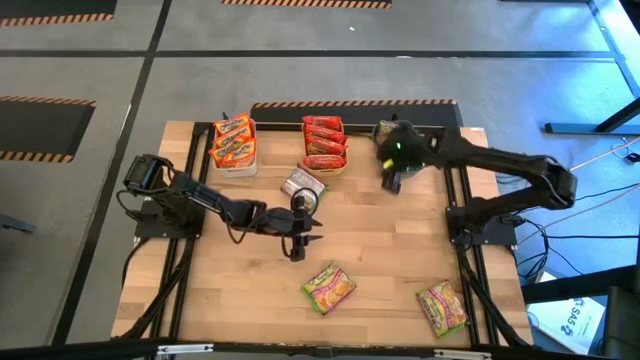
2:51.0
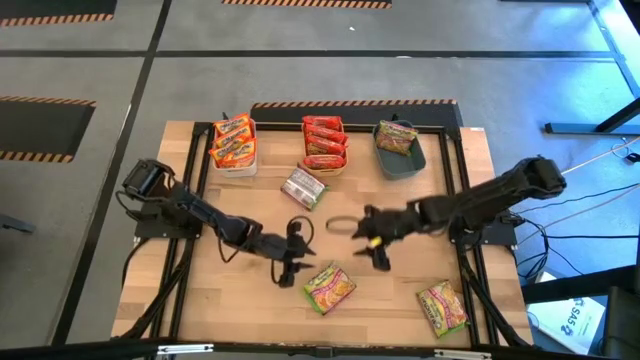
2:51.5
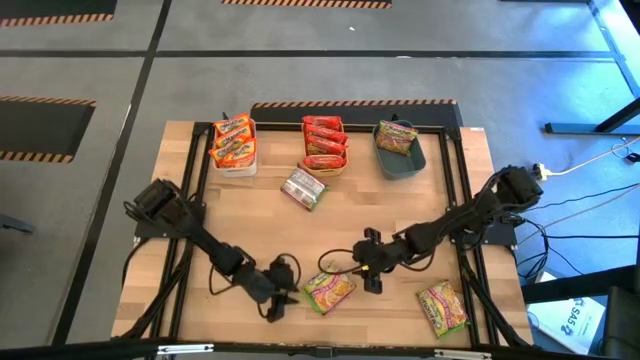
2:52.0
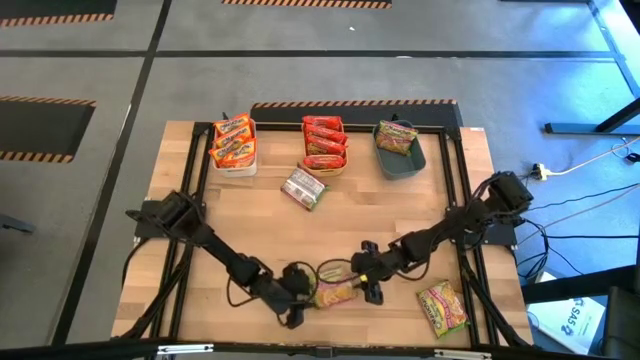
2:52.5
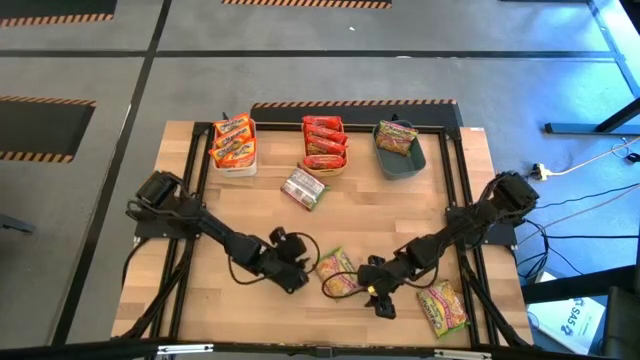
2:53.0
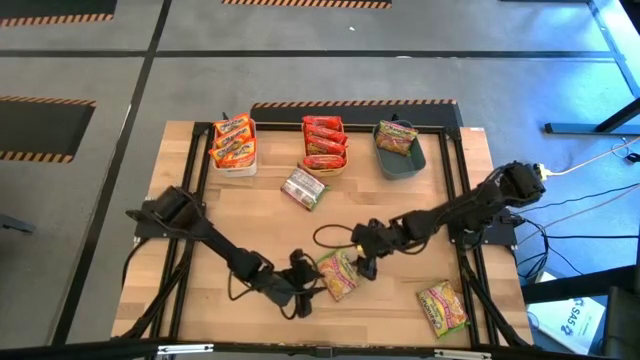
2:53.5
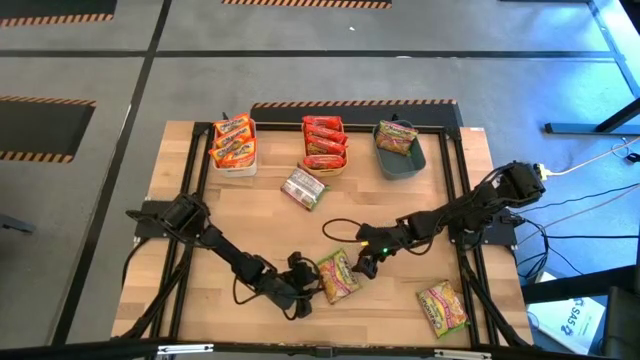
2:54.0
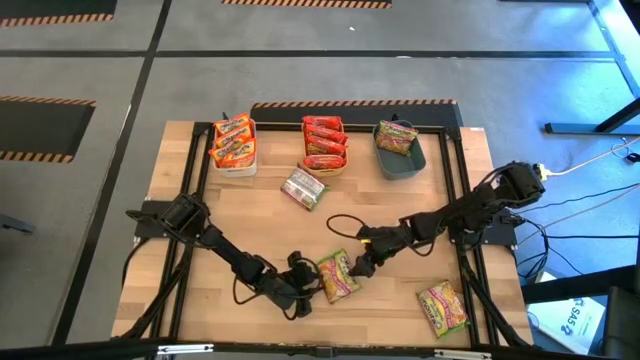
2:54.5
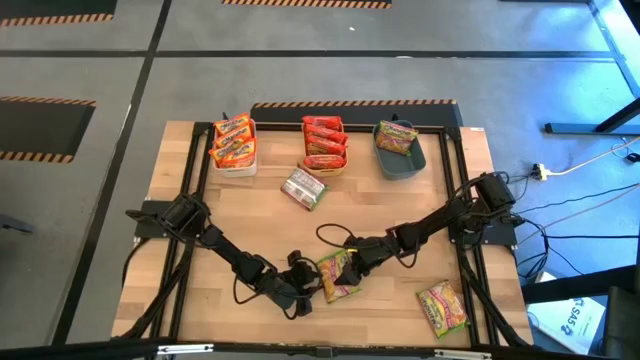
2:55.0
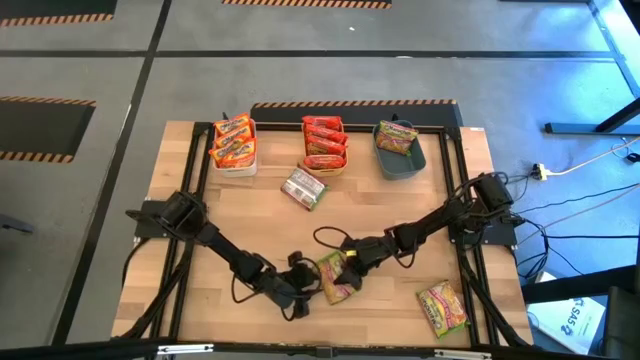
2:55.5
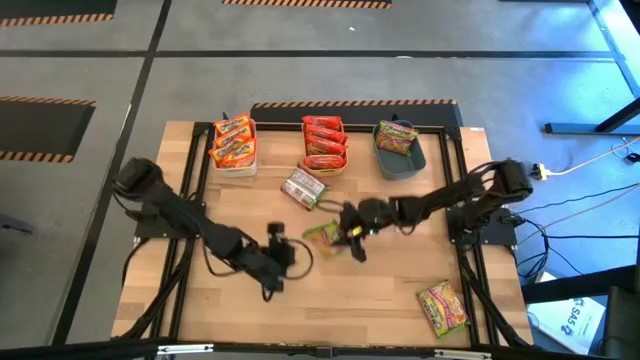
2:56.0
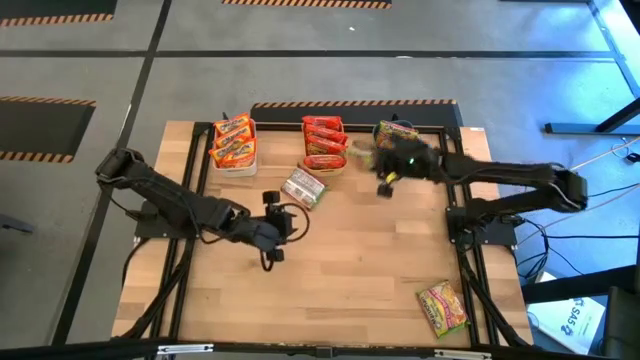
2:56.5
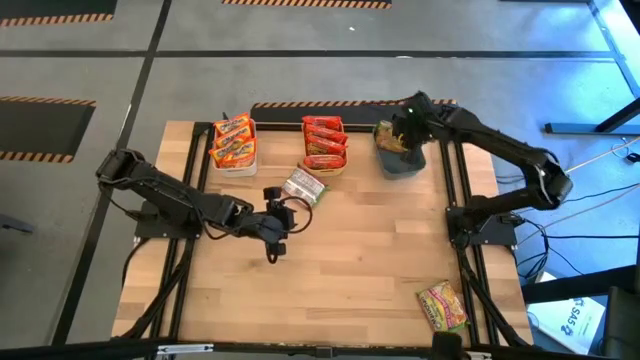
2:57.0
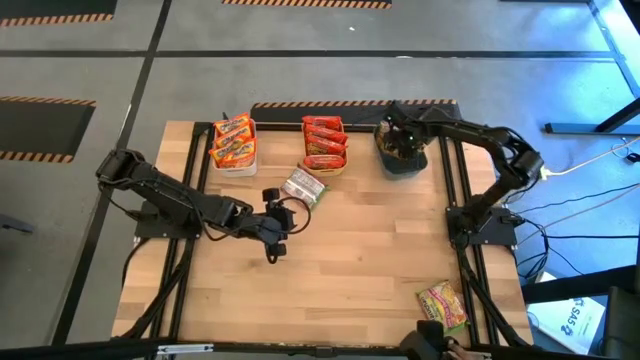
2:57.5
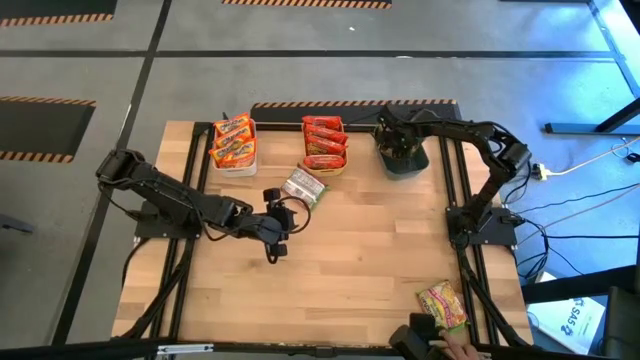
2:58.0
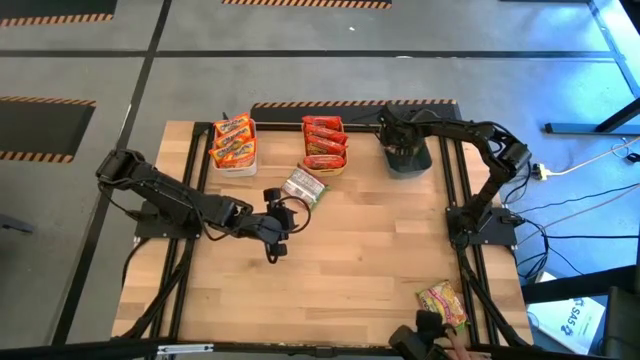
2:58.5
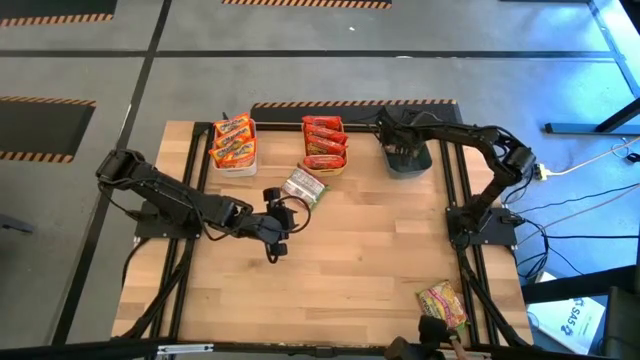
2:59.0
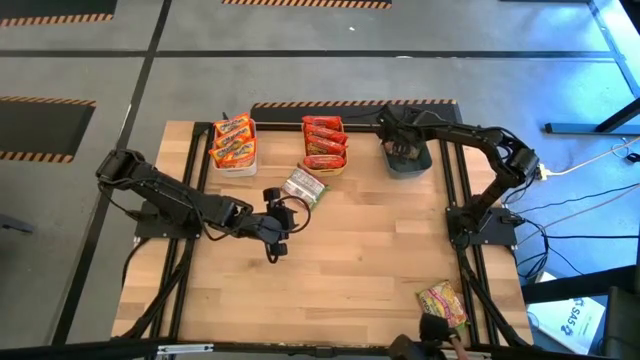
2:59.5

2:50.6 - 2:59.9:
Task: Sort Maruchan noodles
Put the green noodle pack into the blue bin

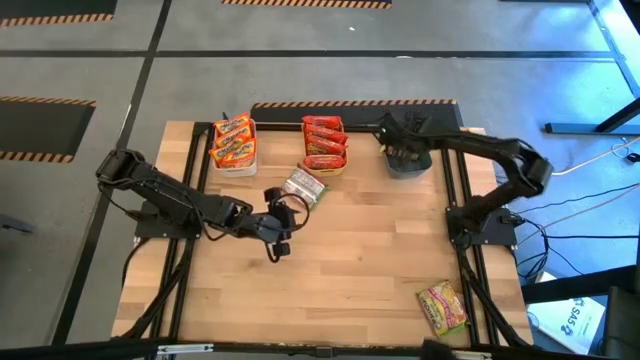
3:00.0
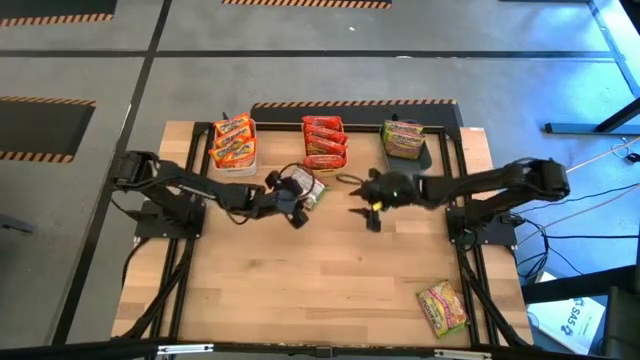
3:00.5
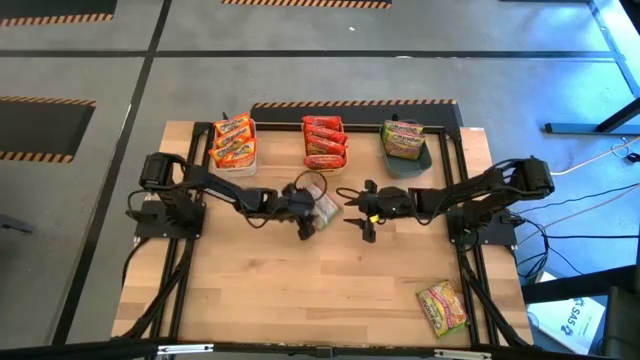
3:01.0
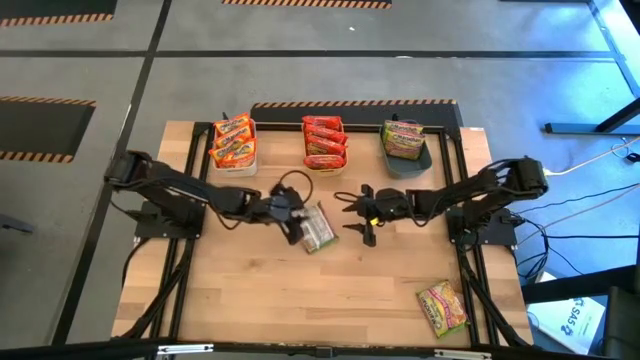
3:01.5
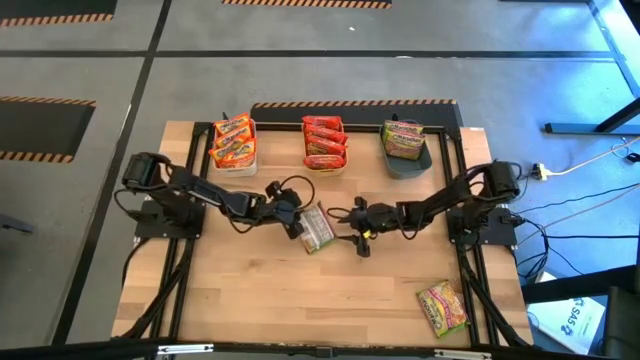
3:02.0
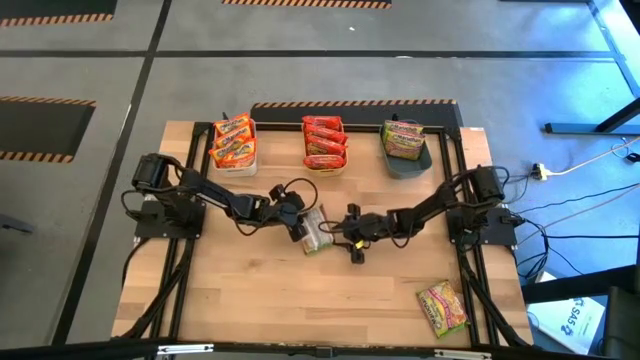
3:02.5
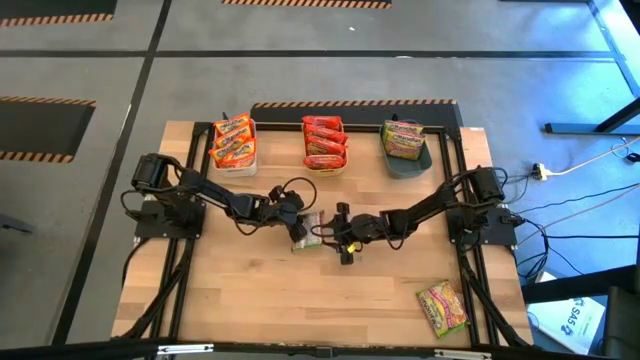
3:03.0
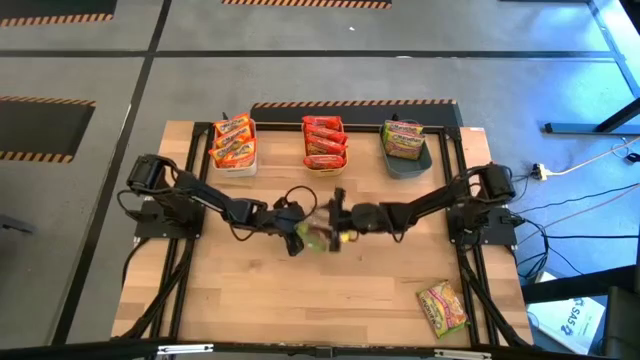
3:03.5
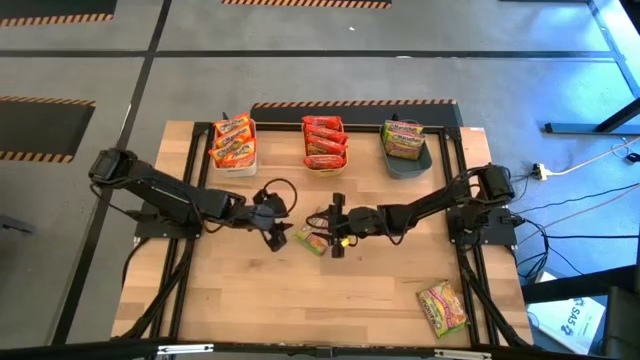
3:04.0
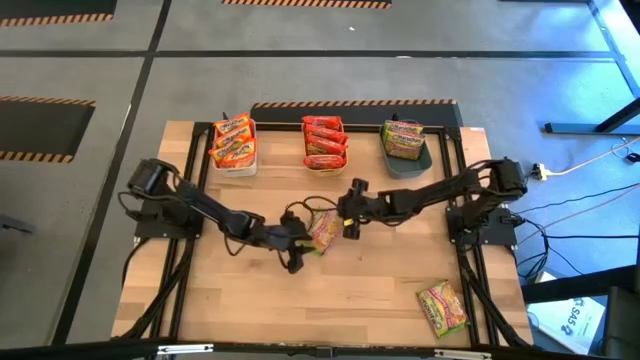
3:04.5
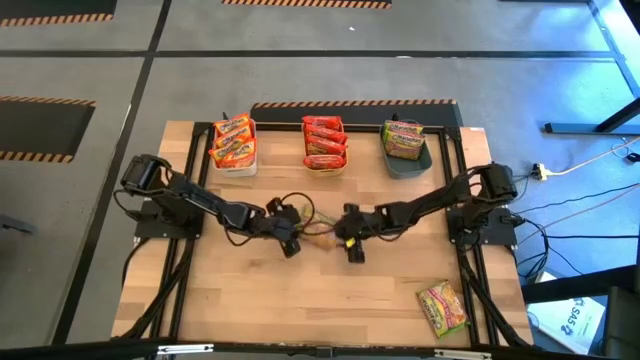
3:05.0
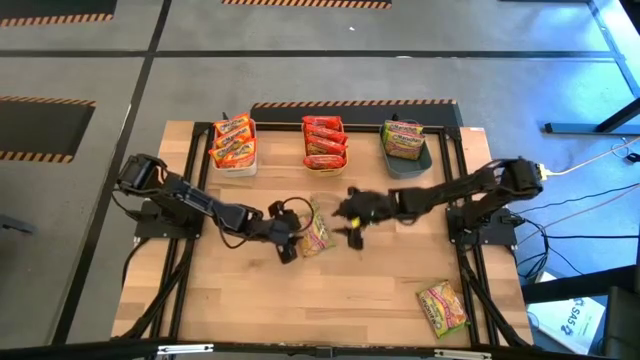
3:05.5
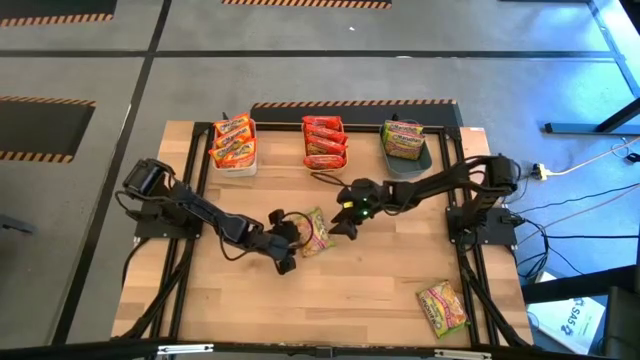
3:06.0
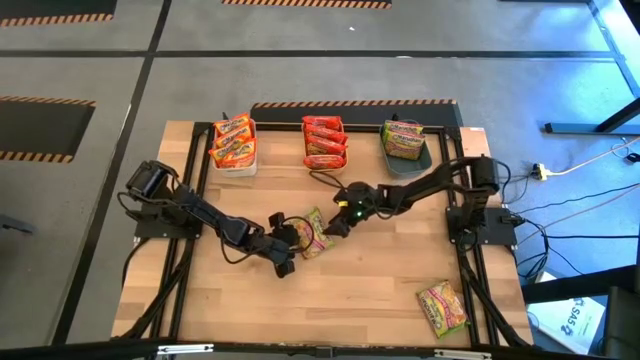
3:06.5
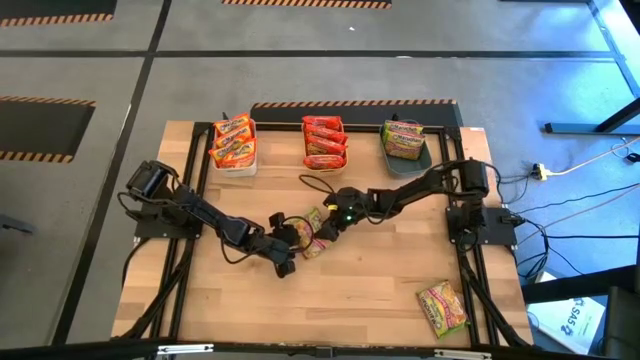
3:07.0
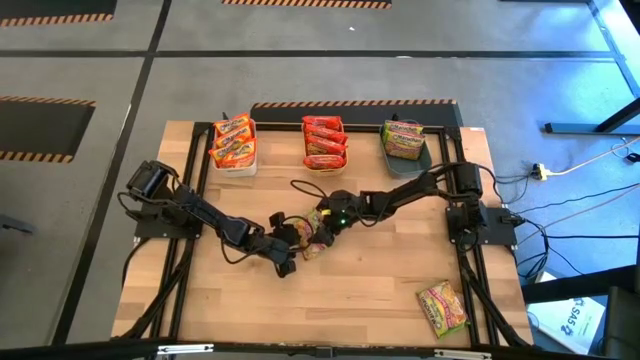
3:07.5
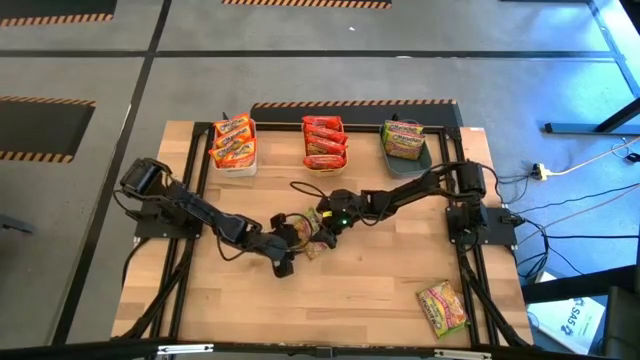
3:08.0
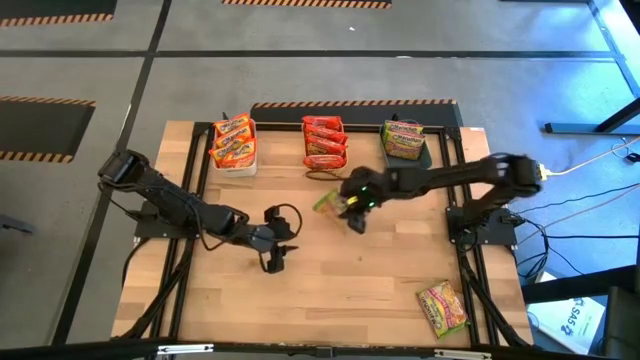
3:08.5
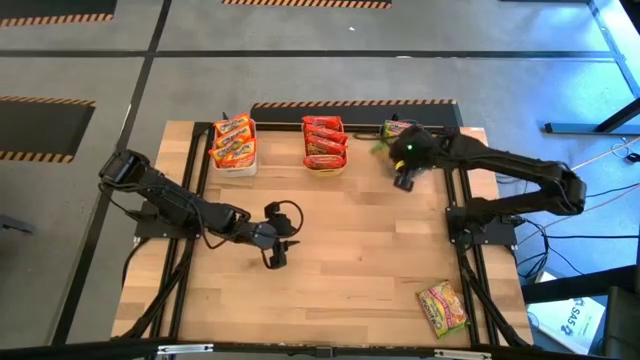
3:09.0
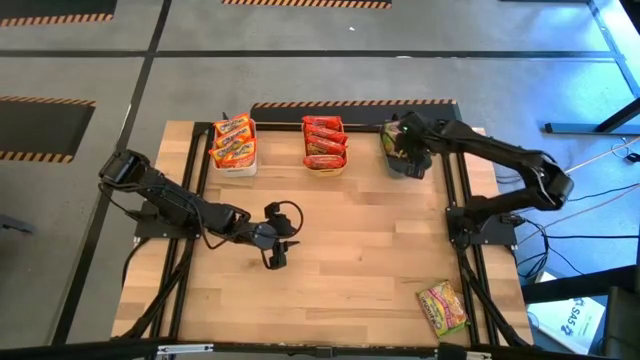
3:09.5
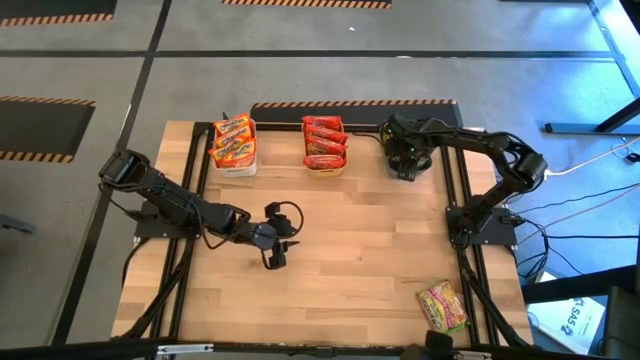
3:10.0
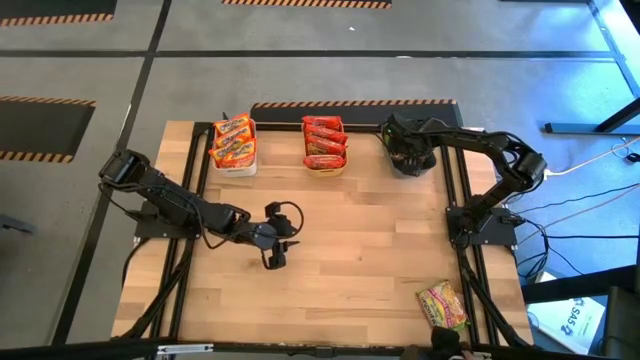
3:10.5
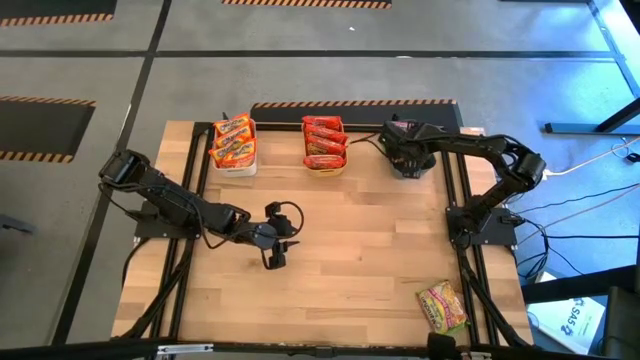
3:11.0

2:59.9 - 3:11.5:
Put the green noodle pack into the blue bin

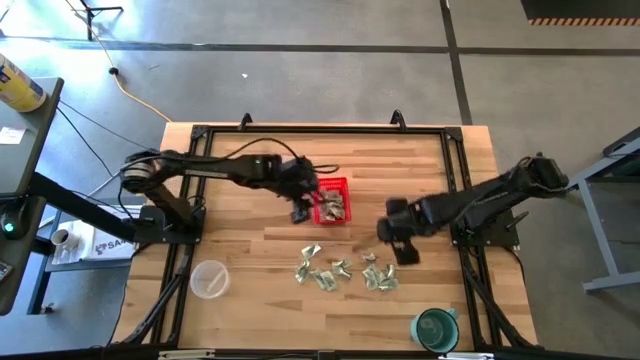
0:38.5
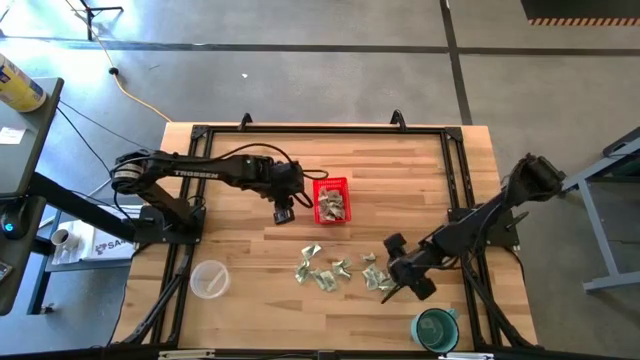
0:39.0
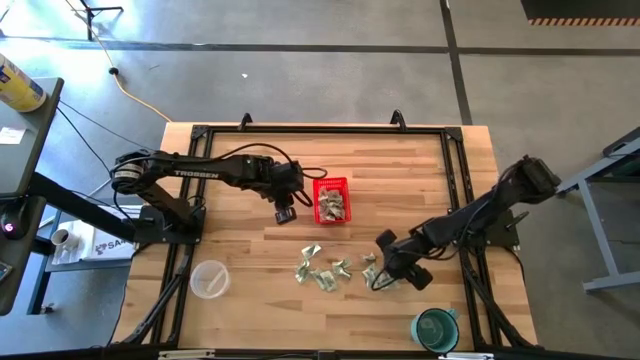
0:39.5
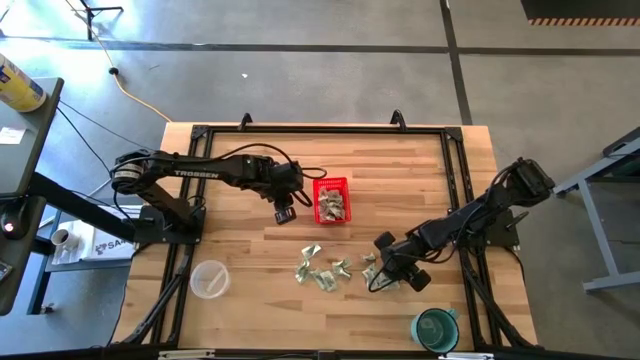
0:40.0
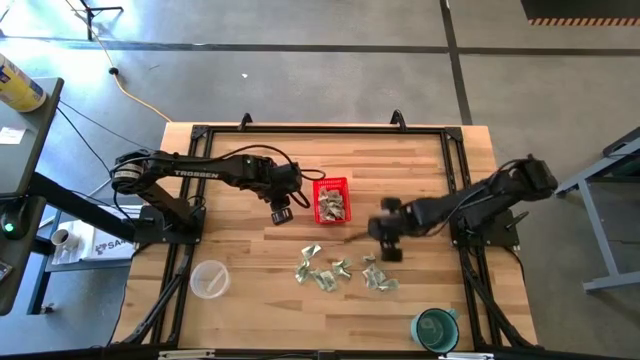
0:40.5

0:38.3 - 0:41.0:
Task: Pick and place items into bin
Put the green truvia packet into the red bin
